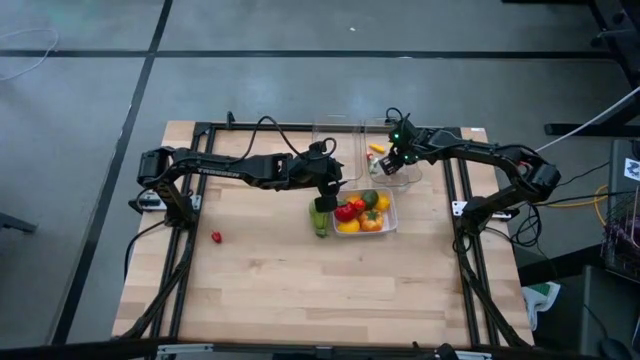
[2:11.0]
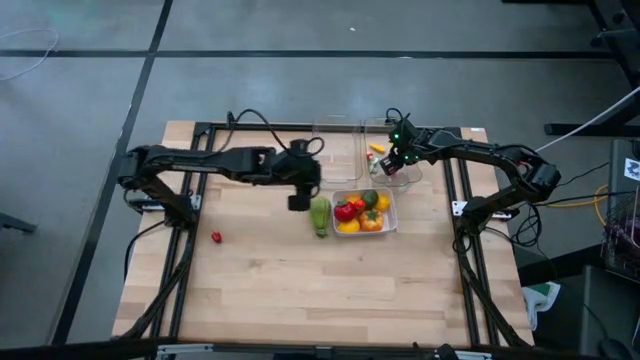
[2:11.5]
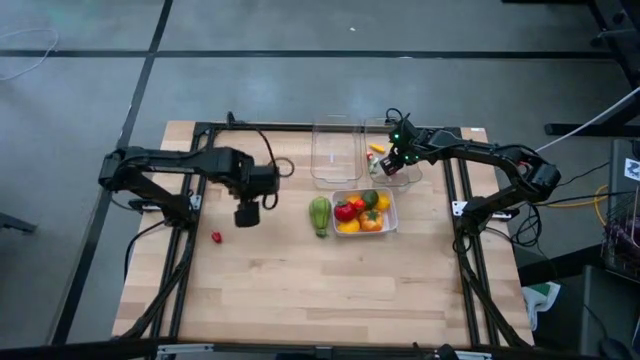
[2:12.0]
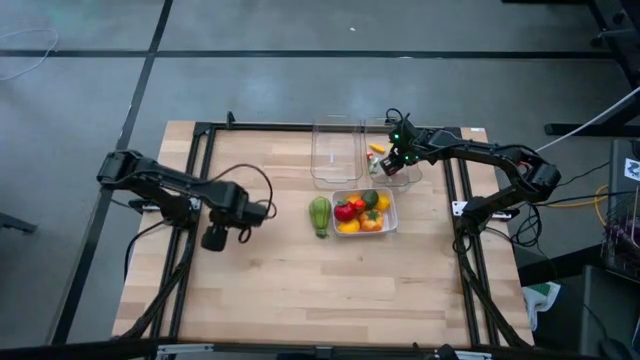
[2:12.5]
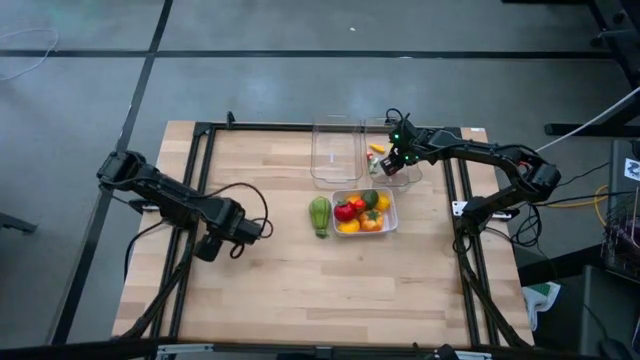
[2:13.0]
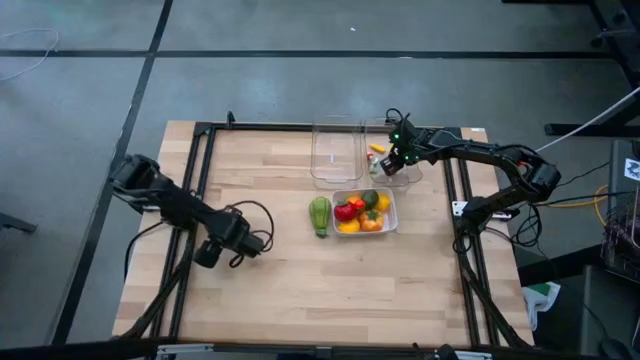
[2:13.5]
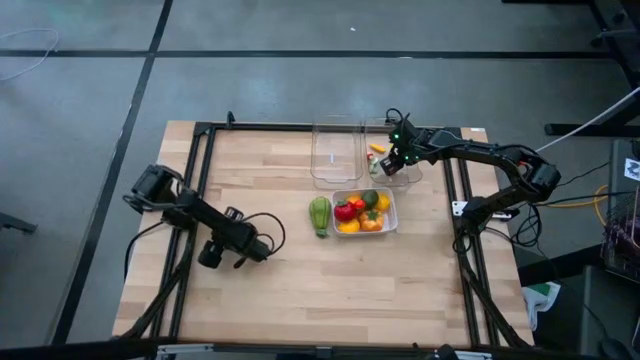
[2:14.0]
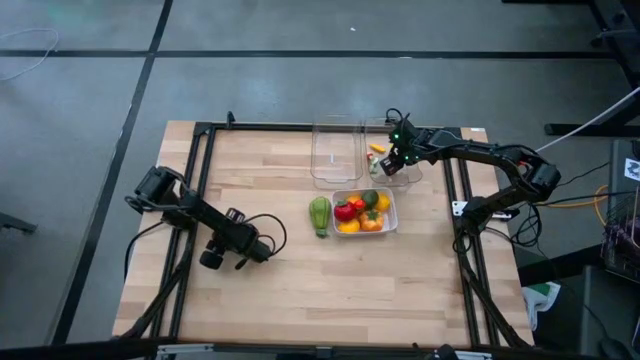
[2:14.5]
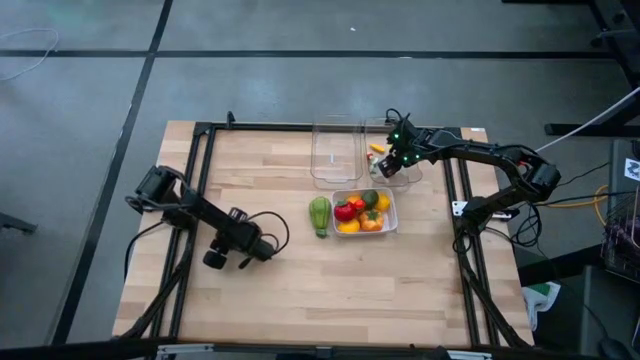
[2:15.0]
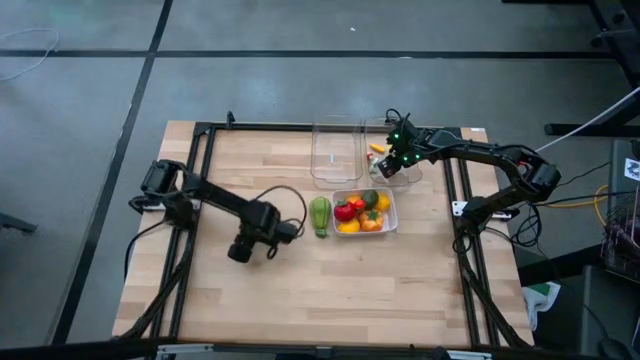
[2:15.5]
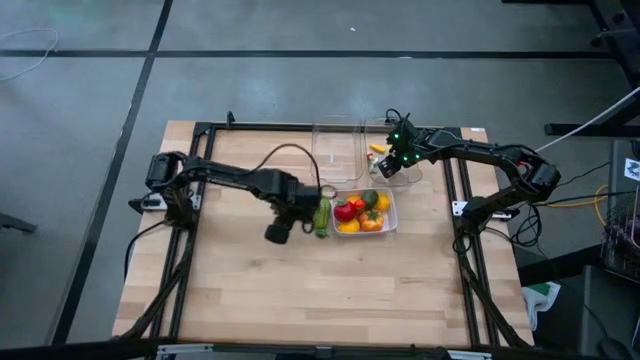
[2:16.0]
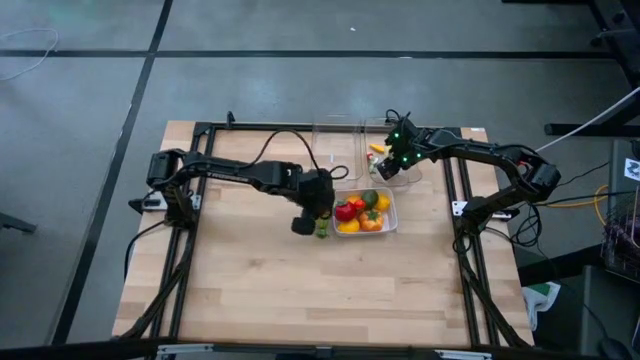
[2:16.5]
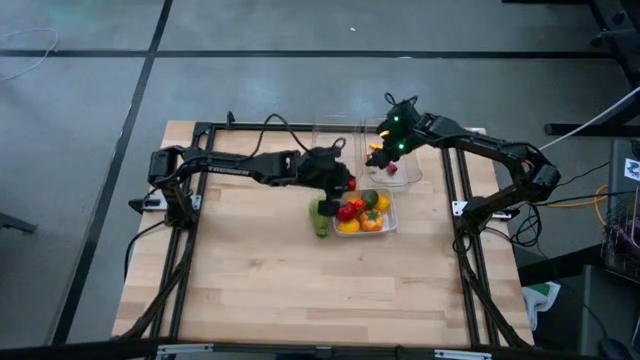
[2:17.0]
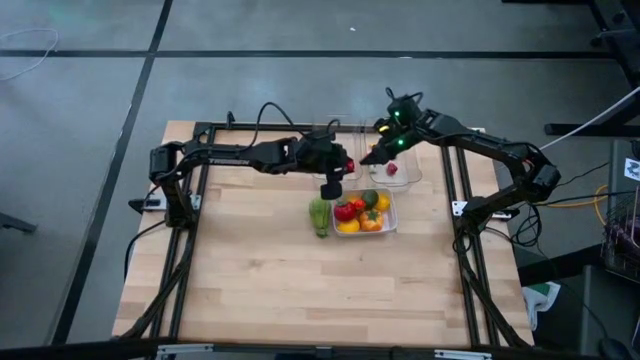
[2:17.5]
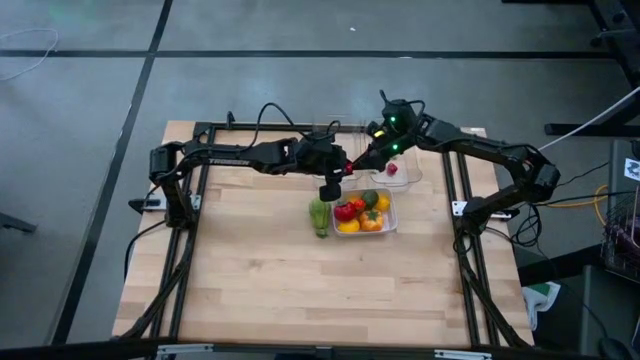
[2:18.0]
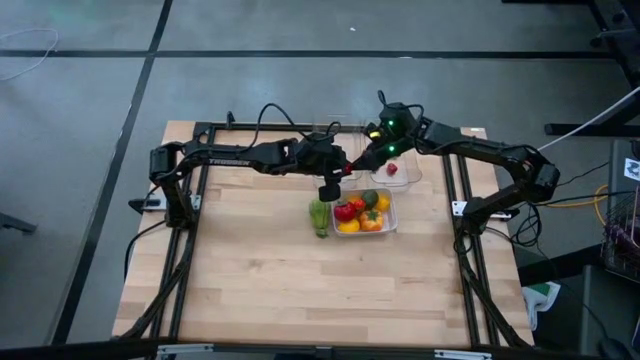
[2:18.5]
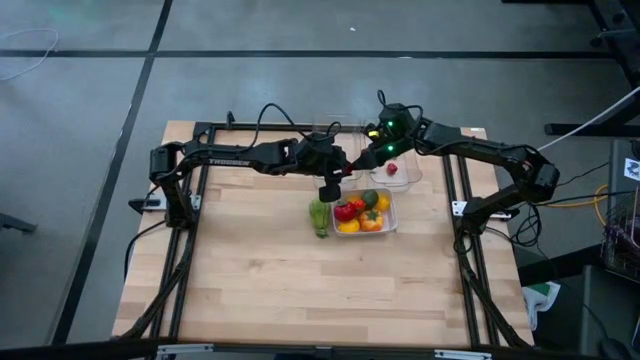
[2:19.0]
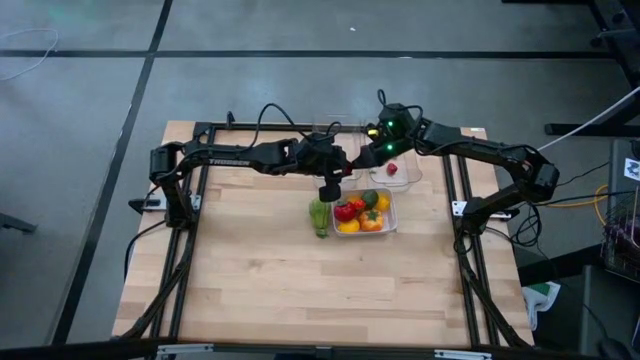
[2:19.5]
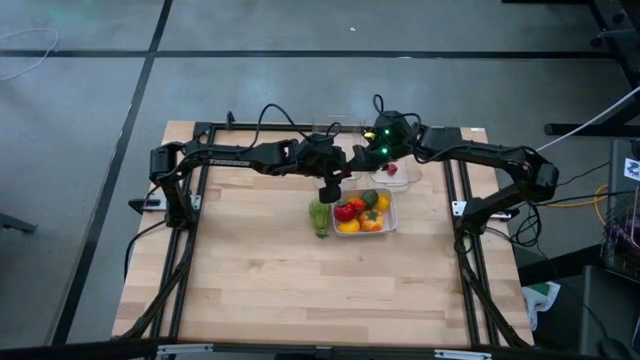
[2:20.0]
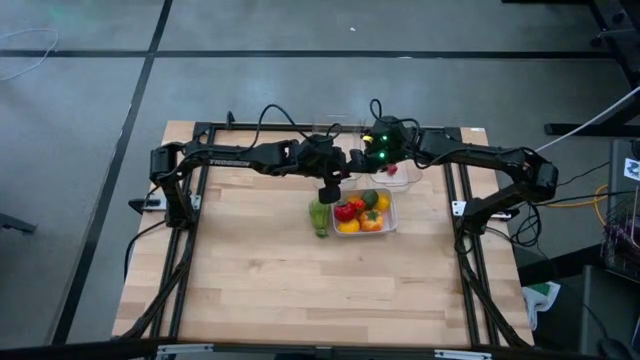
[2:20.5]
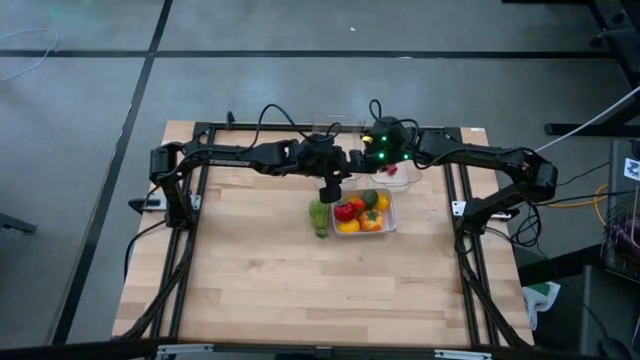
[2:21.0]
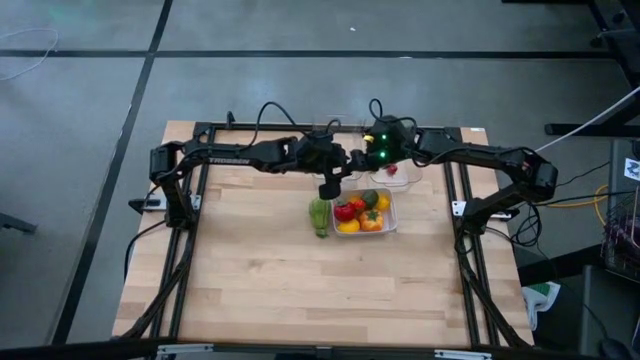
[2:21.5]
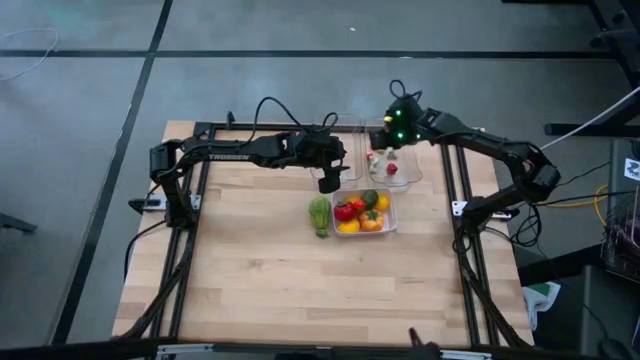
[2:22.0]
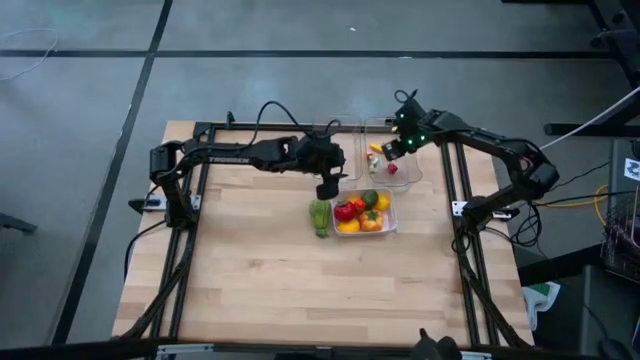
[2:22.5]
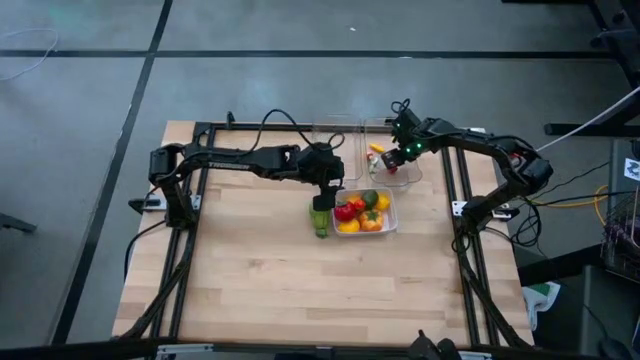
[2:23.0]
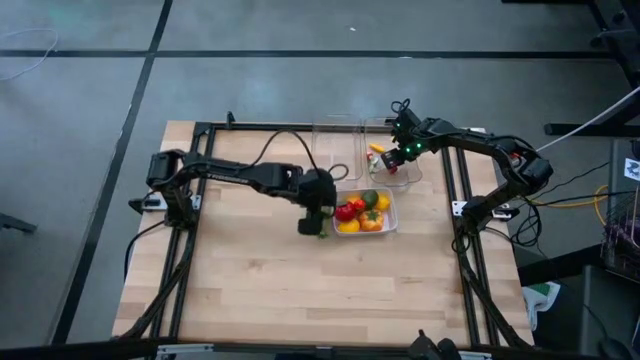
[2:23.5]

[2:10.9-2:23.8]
Task: Sort produce into baskets
Put the red bell pepper into the right transparent bin

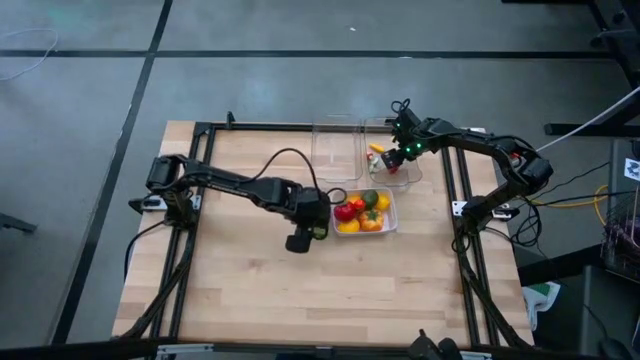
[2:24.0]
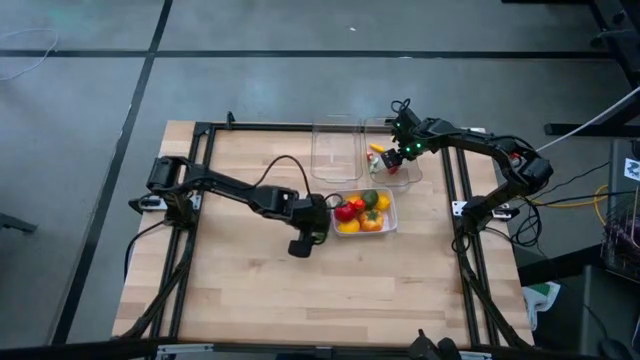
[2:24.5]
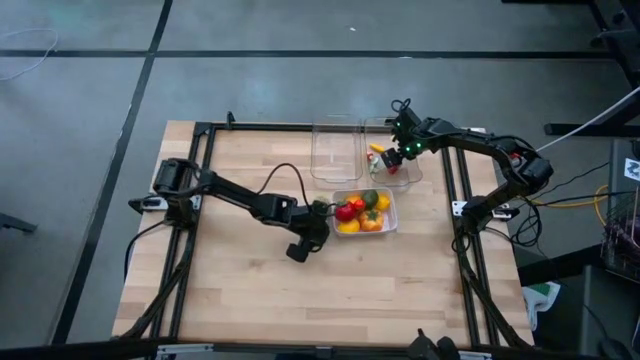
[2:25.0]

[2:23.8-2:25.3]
Put the green bell pepper into the right transparent bin

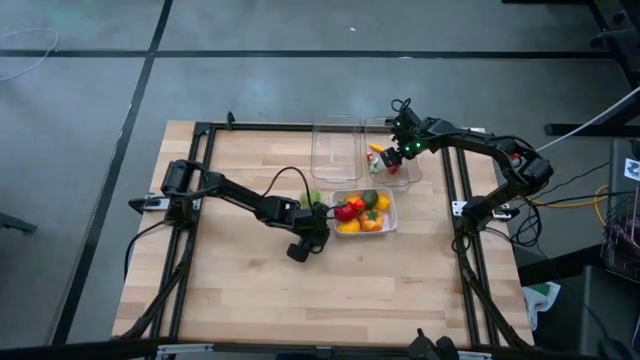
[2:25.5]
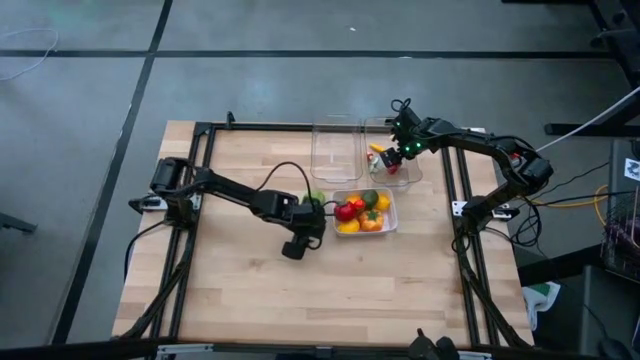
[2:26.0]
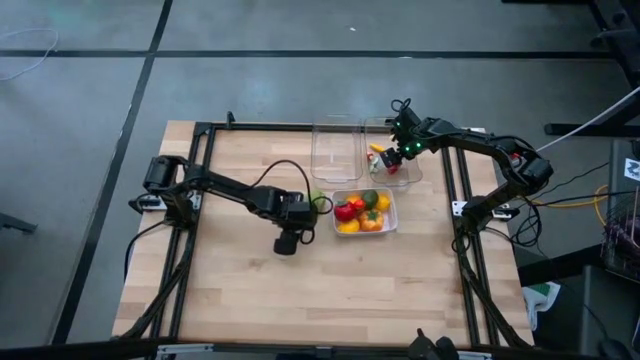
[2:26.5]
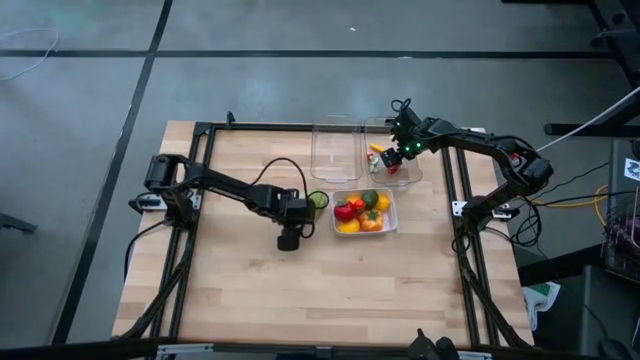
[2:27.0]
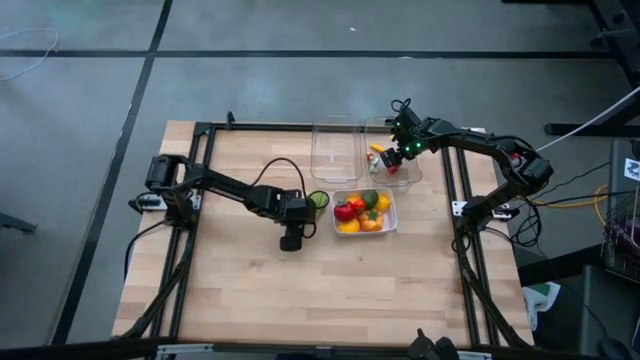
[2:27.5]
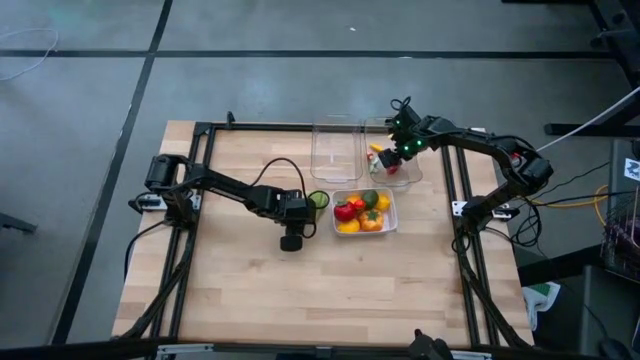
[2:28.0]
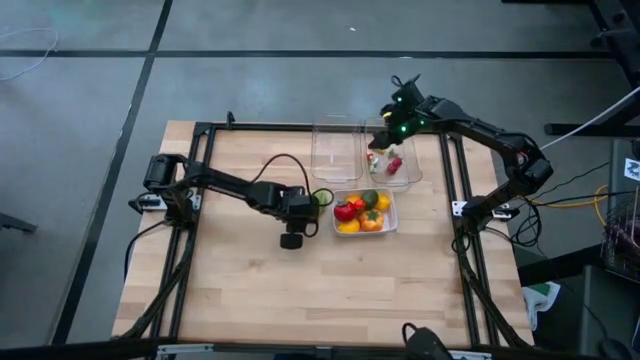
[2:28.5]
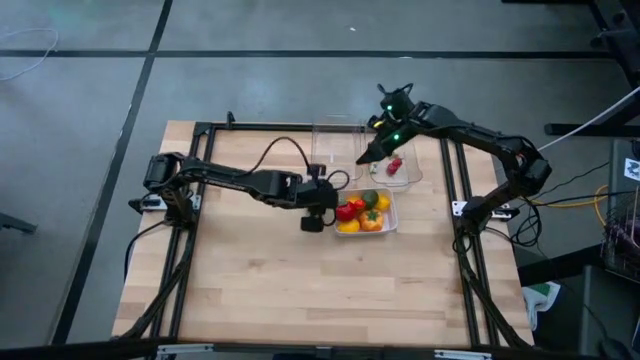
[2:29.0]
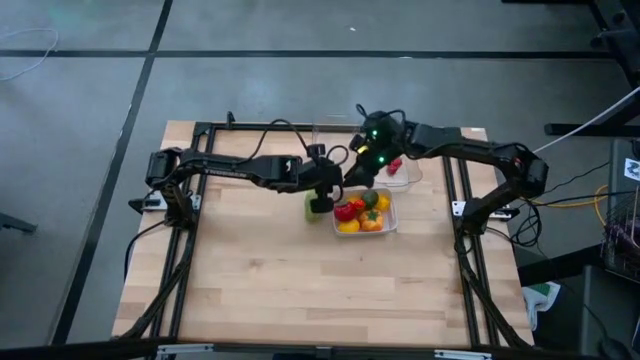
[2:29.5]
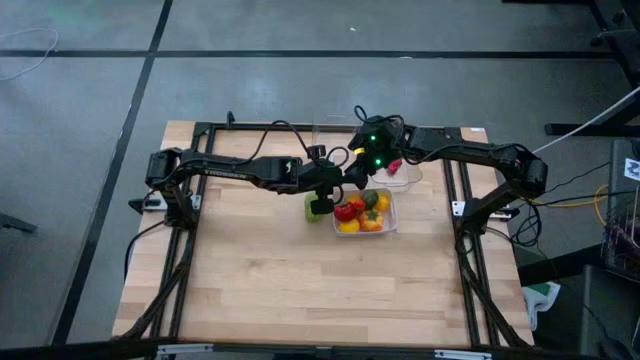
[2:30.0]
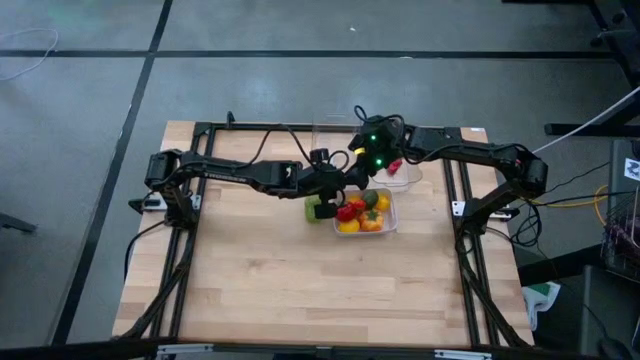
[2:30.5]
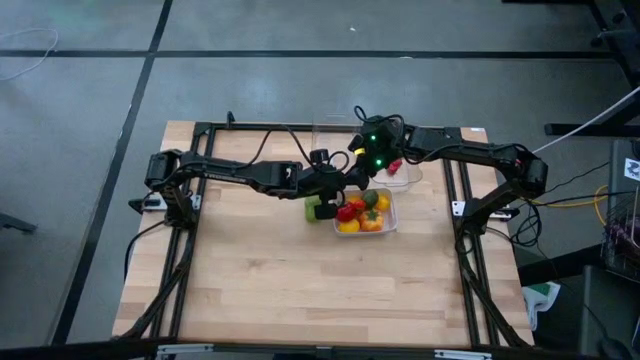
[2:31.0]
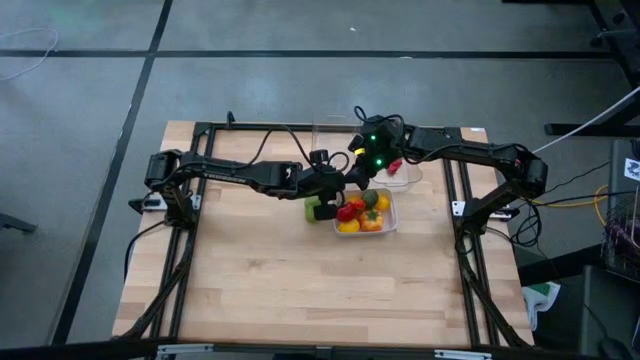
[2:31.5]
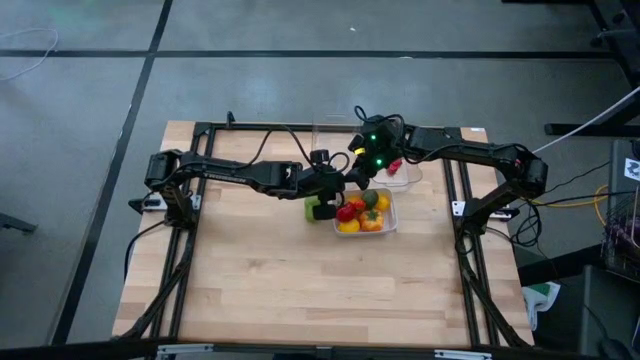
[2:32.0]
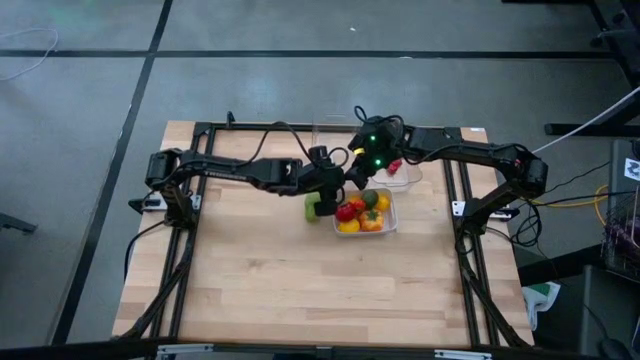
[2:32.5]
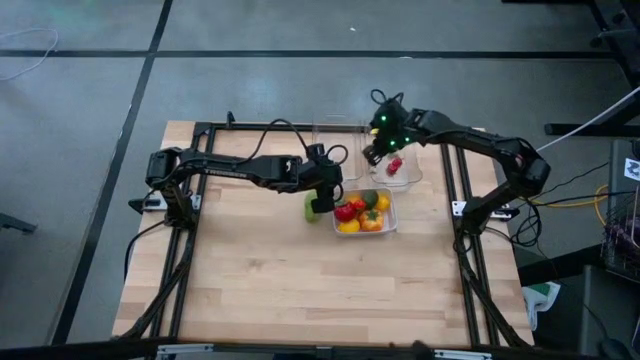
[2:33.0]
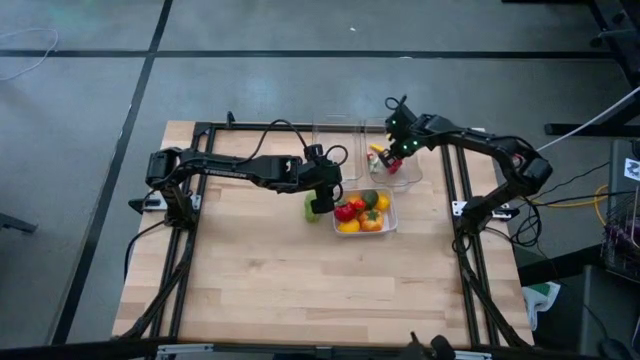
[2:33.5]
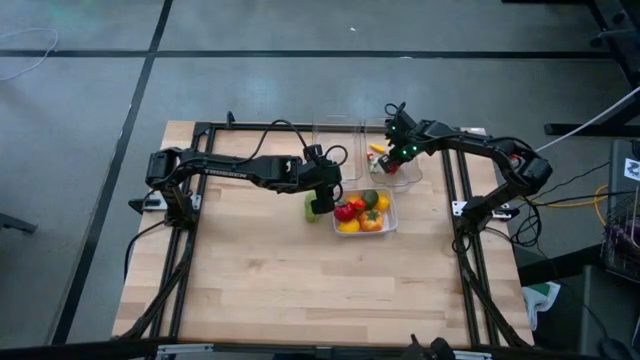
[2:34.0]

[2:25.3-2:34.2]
Put the green bell pepper into the right transparent bin
